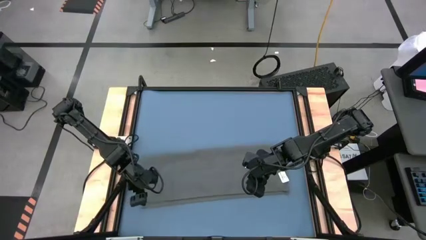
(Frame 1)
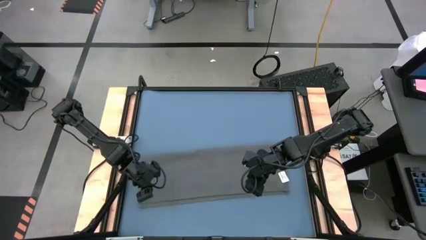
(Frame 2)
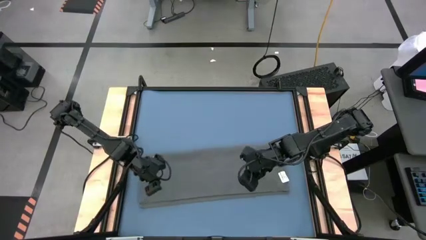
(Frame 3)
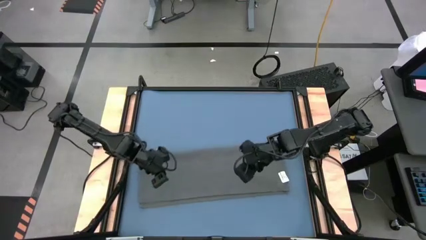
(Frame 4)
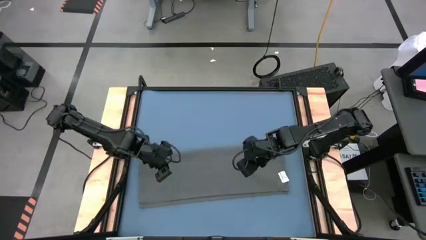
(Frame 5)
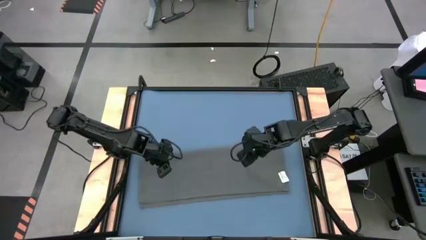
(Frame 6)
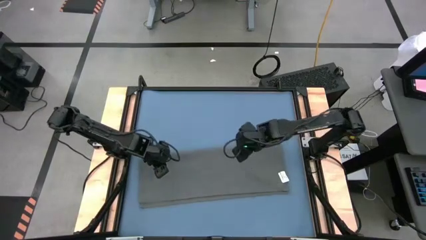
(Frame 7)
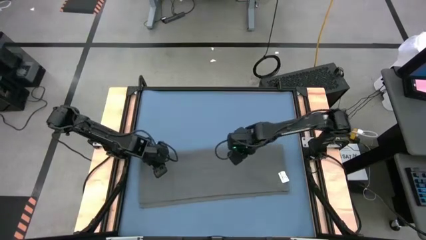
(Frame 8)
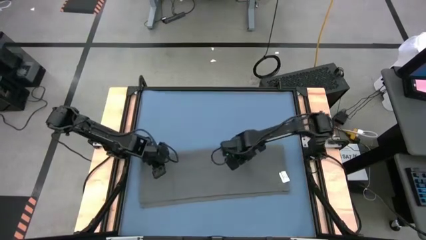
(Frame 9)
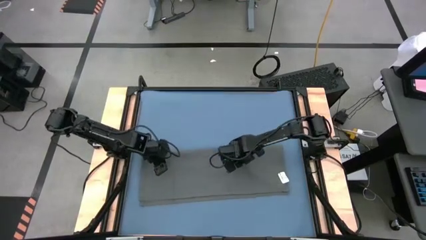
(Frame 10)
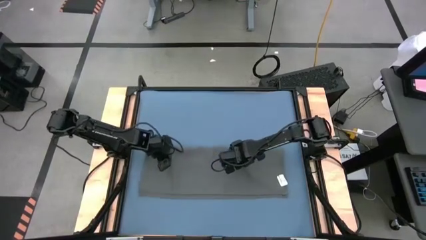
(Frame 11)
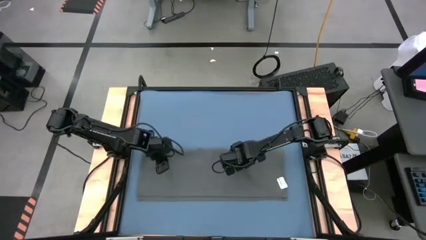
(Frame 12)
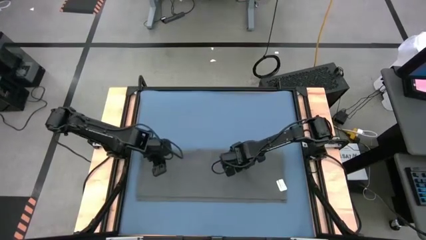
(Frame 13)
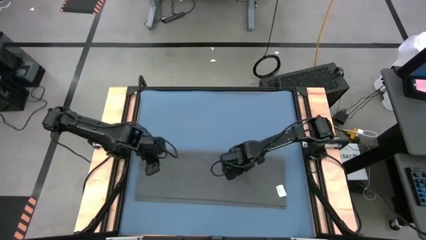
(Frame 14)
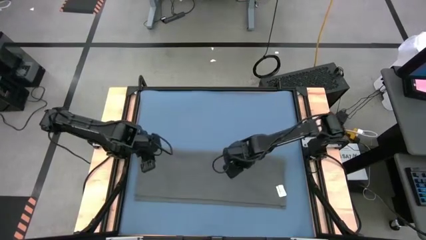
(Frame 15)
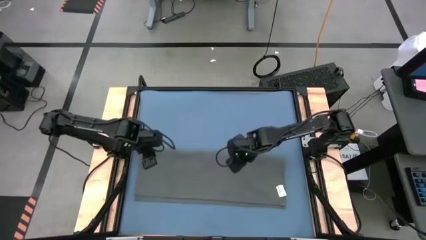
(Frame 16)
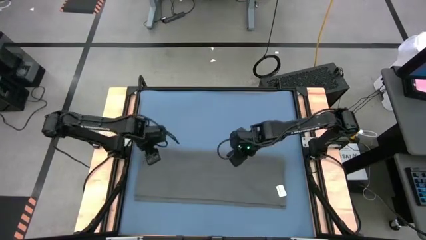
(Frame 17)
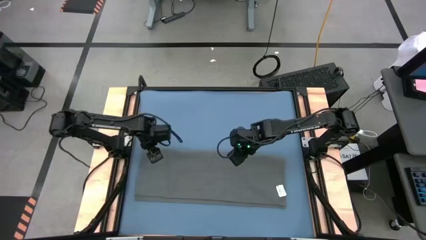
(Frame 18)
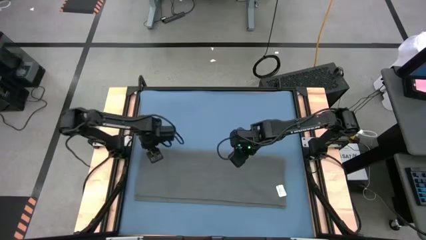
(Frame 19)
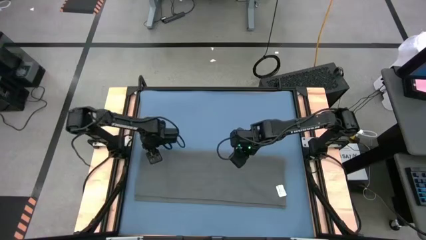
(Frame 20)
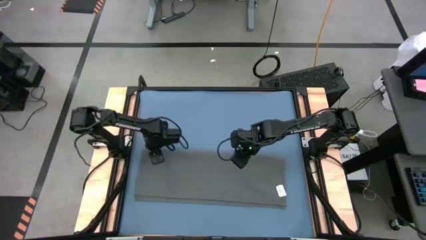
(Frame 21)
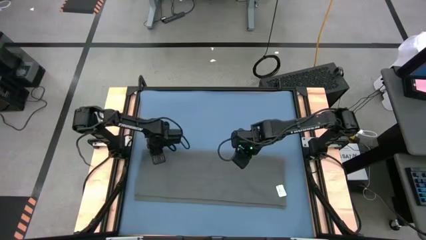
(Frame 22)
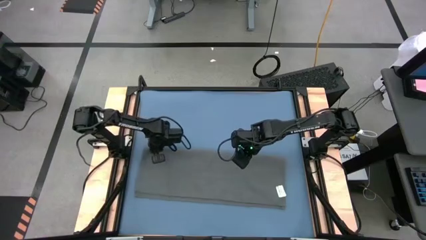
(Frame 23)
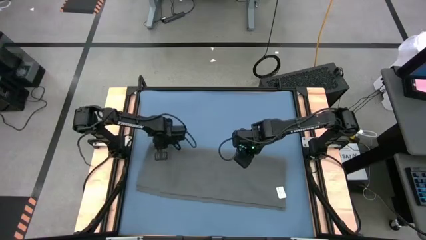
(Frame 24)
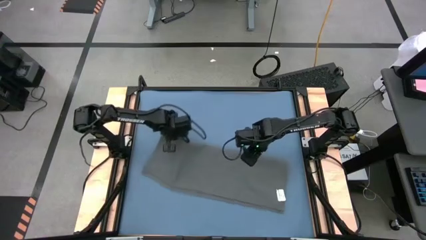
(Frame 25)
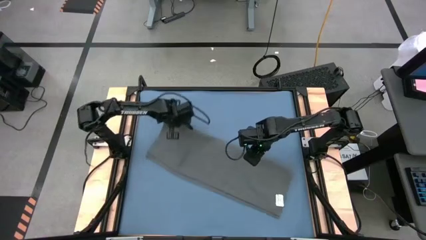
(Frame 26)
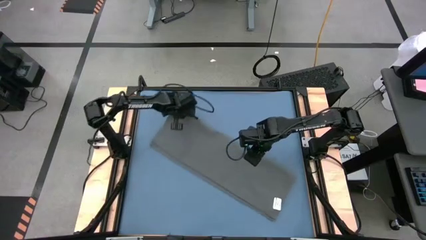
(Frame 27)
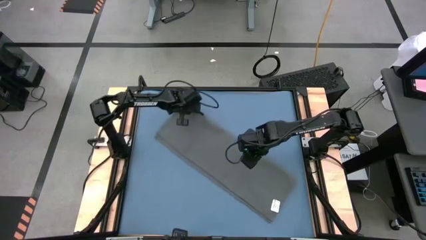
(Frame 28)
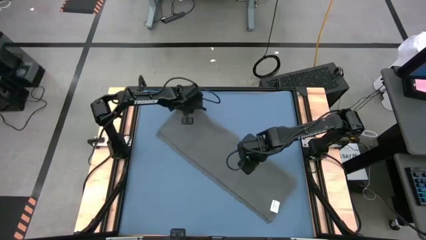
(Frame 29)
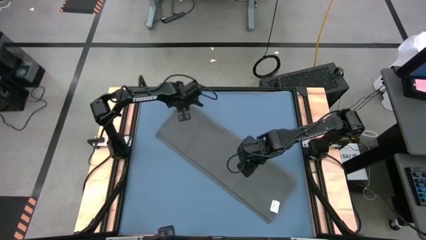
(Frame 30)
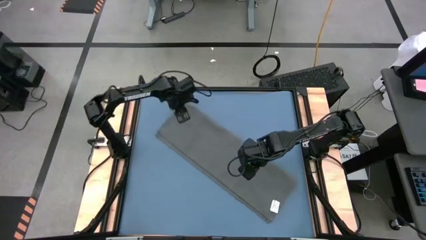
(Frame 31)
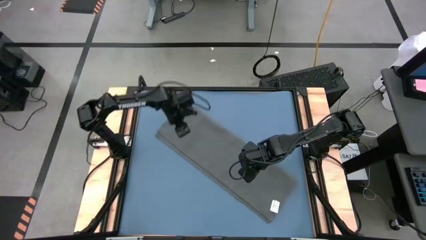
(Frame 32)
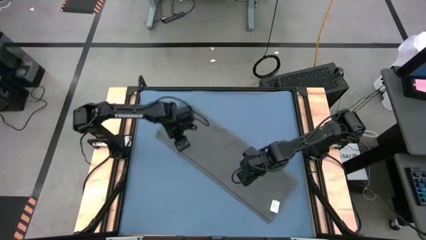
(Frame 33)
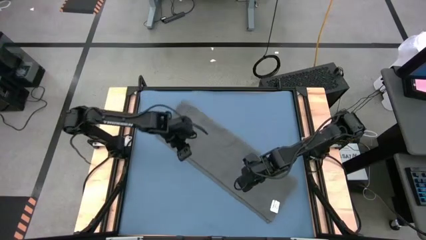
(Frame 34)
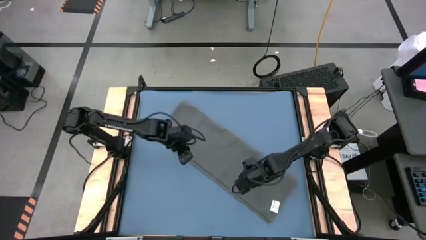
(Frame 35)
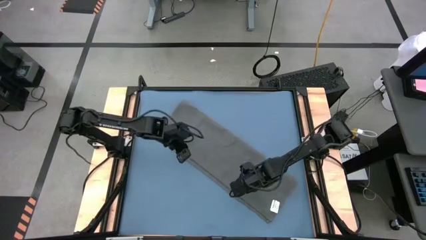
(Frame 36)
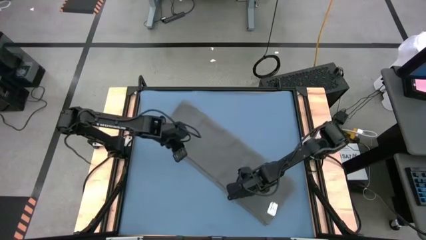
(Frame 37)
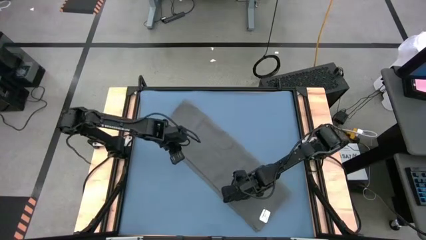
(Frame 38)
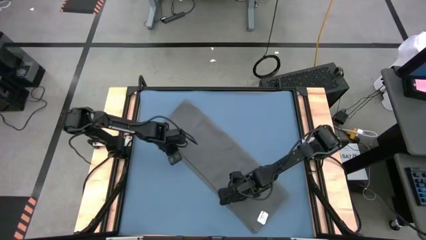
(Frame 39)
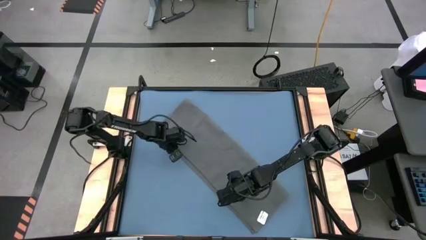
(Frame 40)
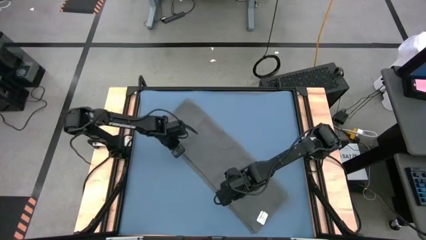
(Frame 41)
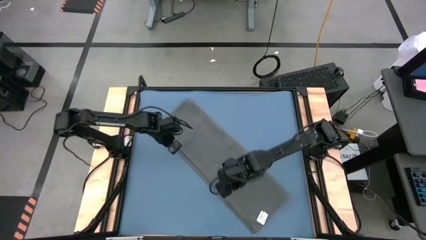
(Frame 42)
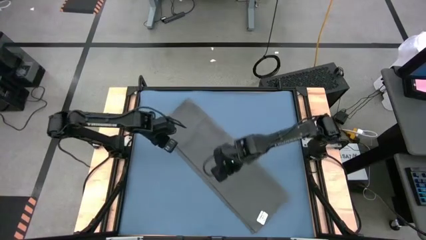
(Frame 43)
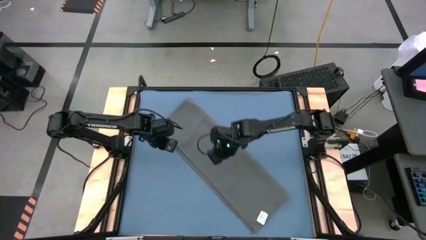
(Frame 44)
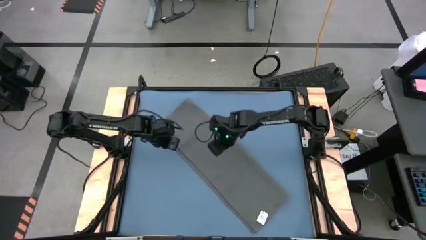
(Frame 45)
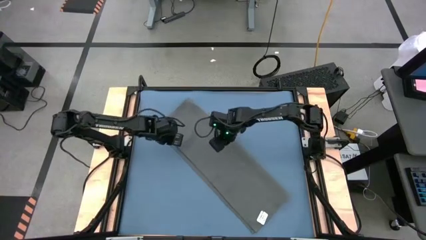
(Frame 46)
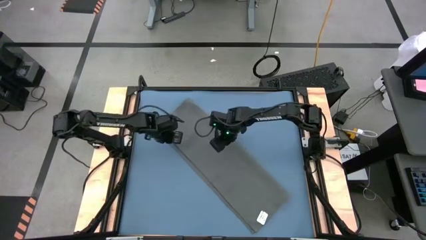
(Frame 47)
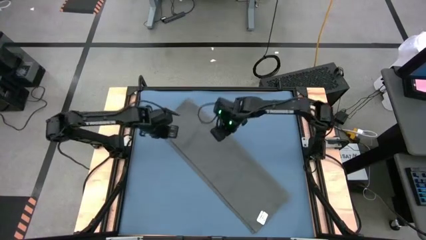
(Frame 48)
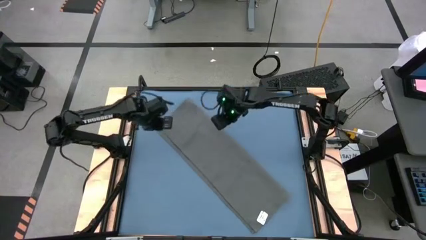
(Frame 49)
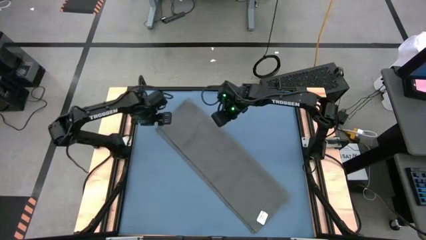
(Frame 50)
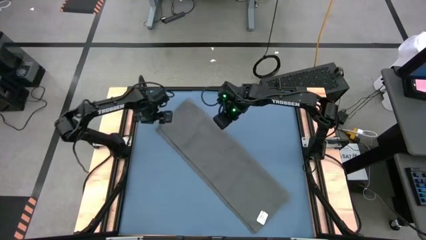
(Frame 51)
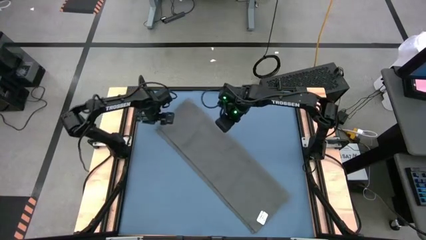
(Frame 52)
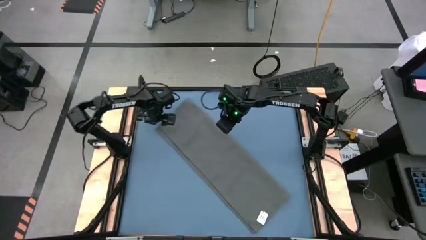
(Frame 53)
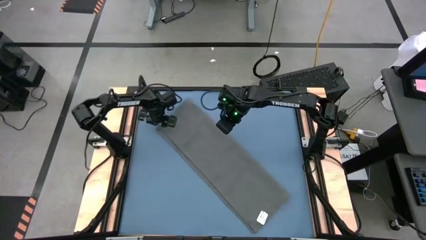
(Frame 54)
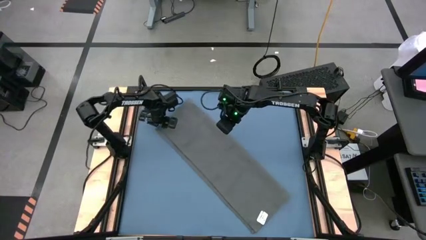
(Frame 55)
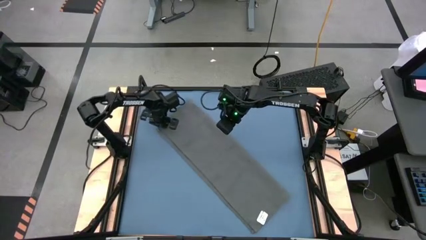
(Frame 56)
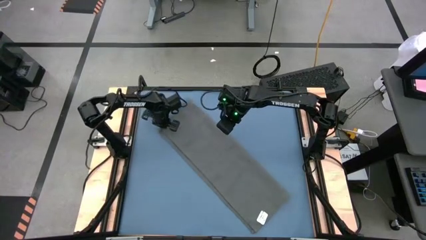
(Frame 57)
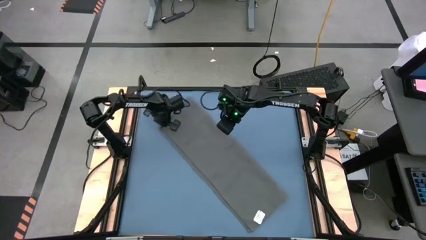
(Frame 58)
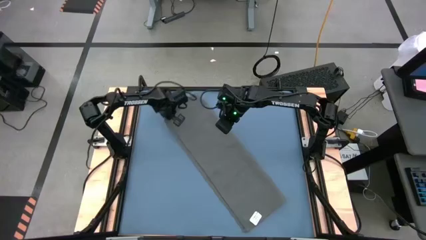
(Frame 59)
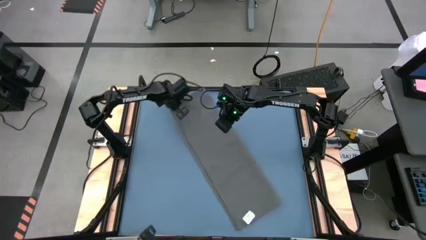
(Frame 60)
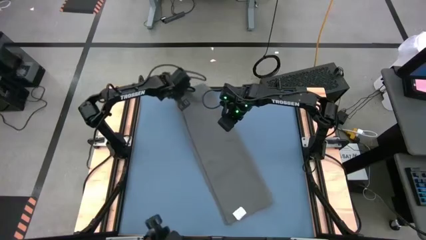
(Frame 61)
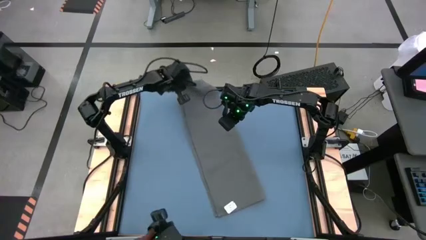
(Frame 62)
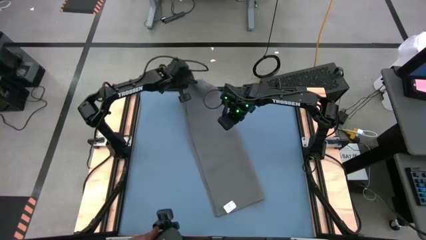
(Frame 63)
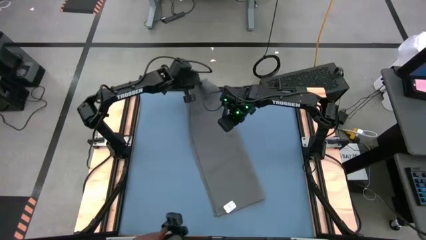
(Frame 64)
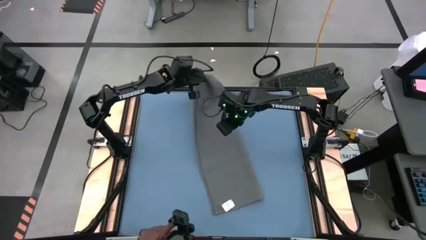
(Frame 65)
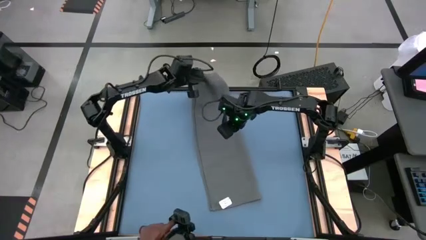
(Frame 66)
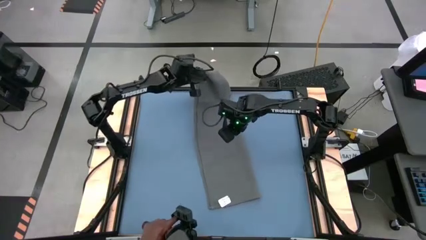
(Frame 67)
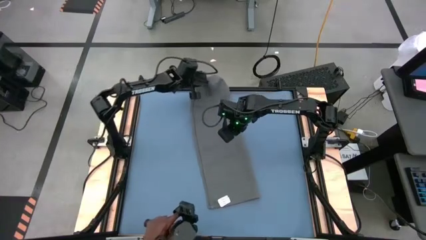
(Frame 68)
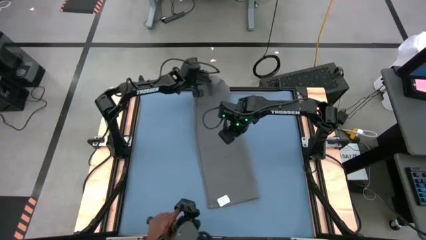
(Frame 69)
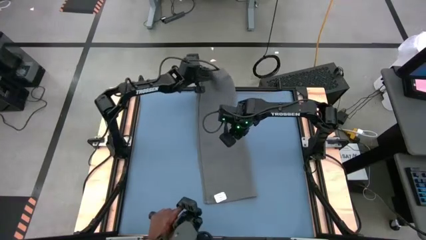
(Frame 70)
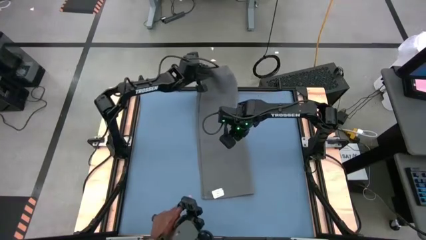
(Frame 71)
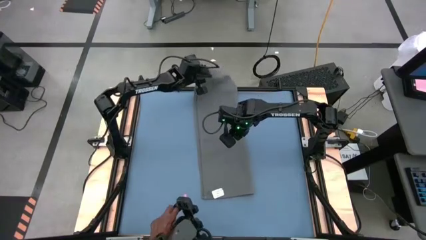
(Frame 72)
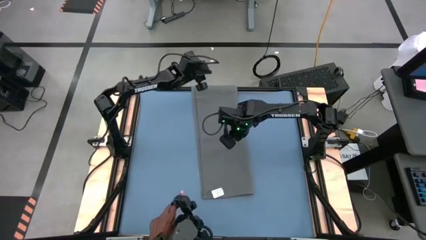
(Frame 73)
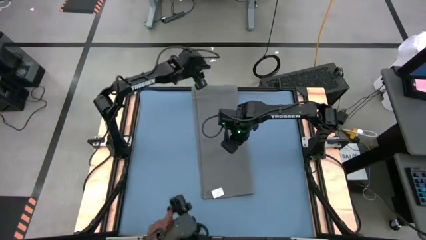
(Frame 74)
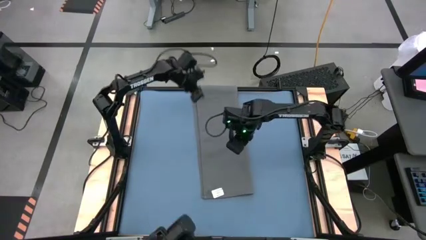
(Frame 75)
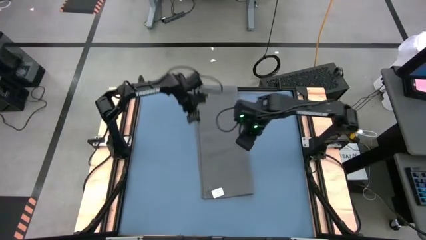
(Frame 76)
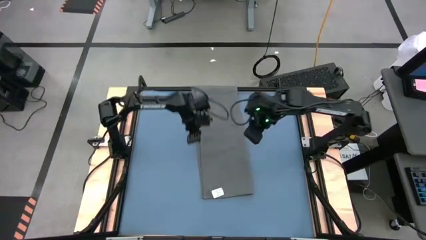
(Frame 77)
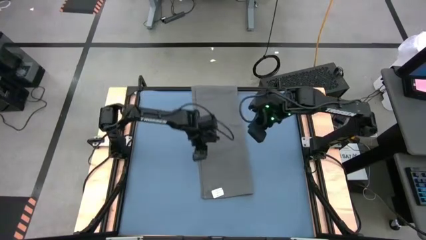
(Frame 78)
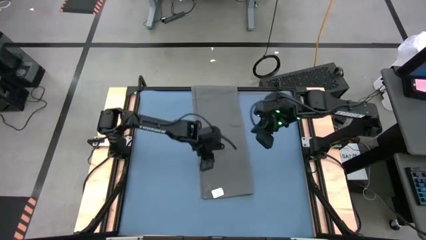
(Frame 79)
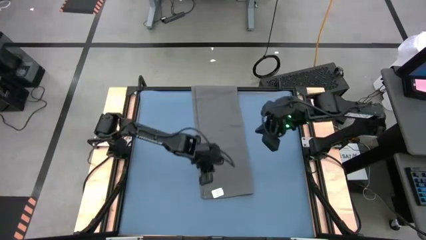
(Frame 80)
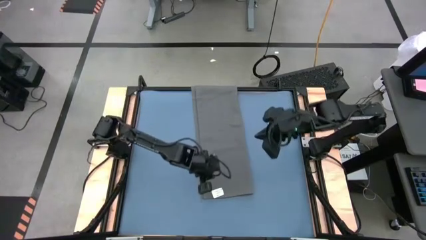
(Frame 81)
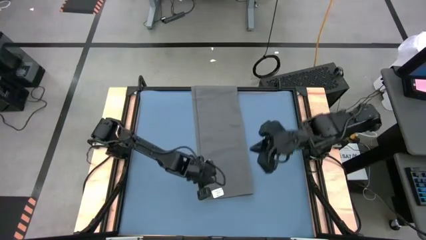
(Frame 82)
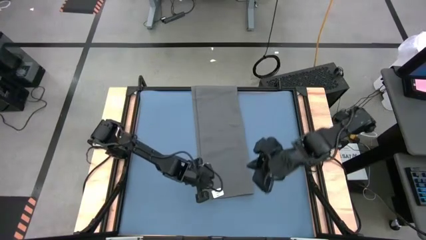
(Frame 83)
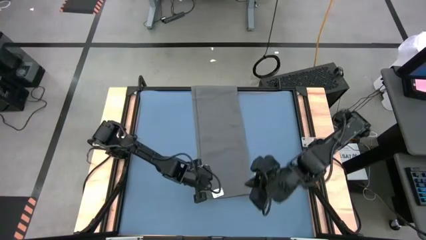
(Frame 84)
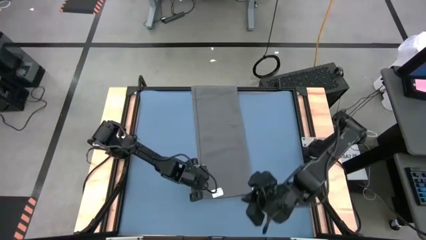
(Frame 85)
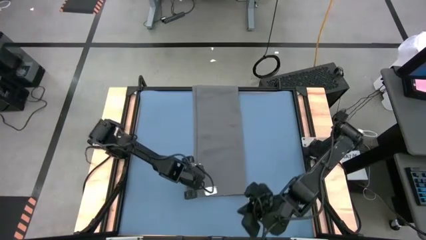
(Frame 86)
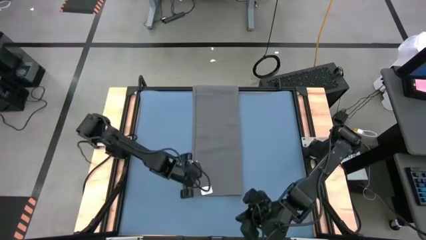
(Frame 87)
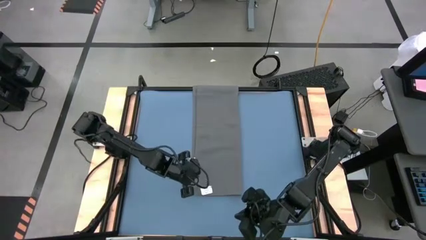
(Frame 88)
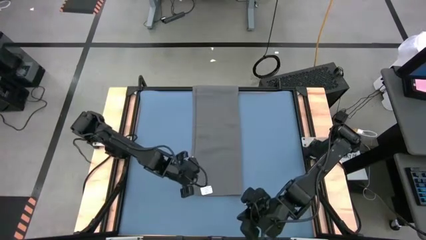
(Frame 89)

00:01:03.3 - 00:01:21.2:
Task: Roll towel
Roll the gray towel
